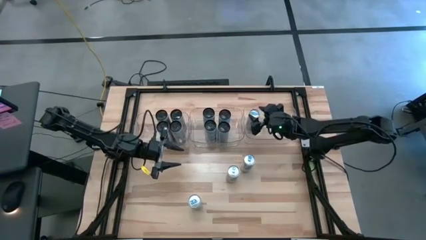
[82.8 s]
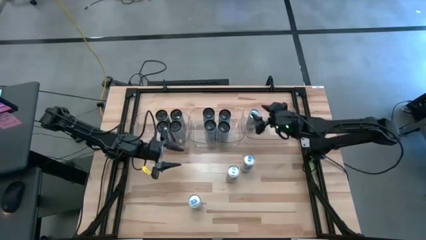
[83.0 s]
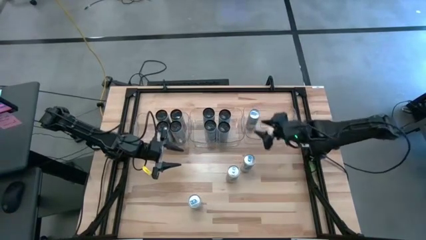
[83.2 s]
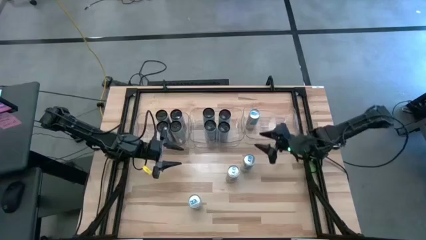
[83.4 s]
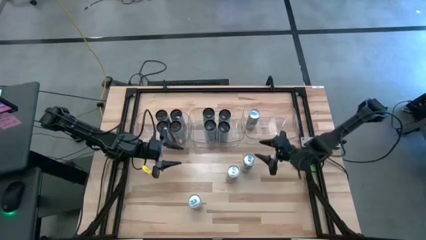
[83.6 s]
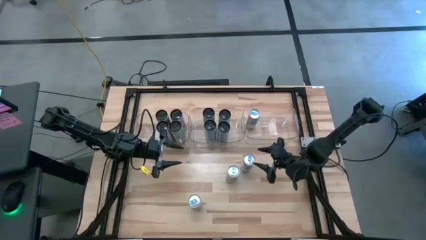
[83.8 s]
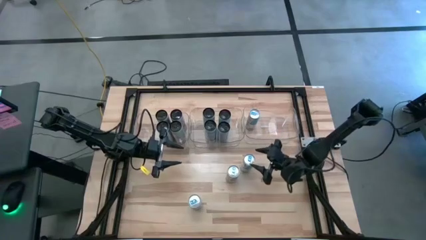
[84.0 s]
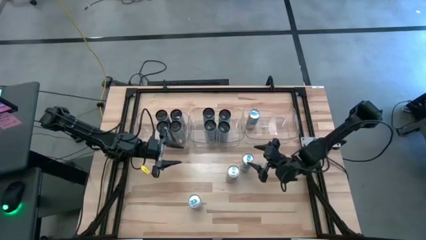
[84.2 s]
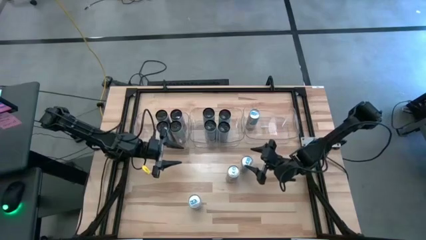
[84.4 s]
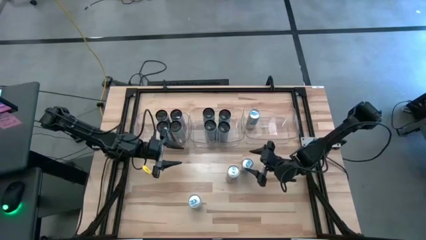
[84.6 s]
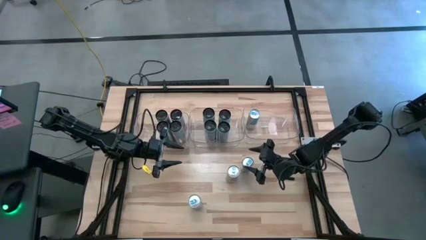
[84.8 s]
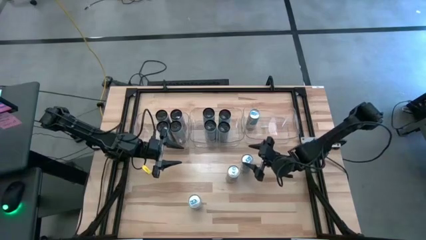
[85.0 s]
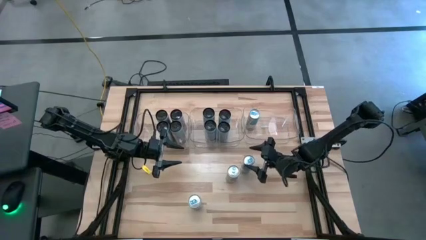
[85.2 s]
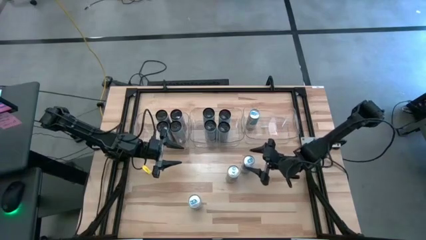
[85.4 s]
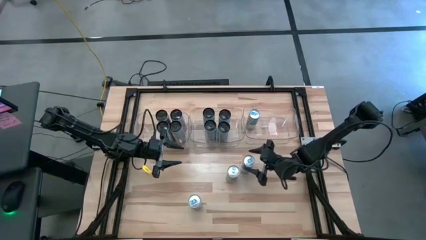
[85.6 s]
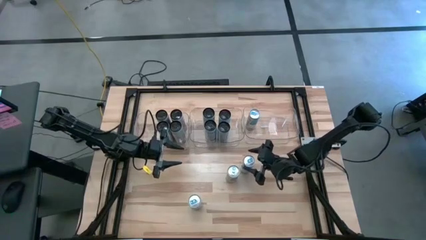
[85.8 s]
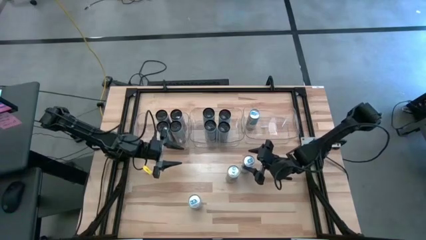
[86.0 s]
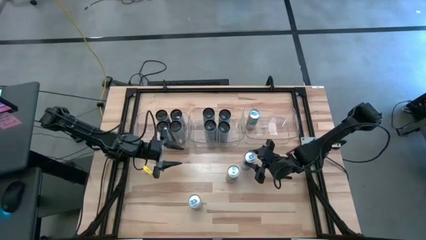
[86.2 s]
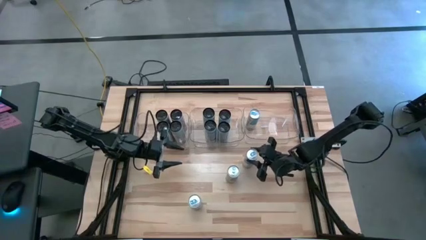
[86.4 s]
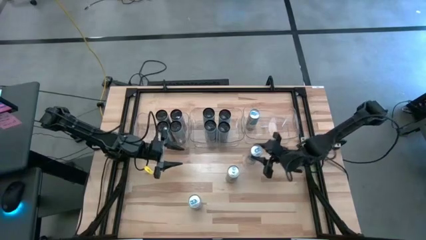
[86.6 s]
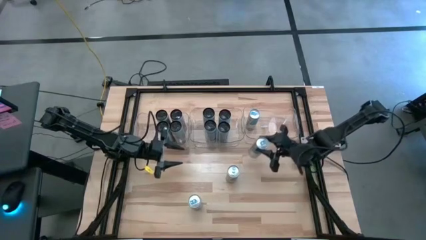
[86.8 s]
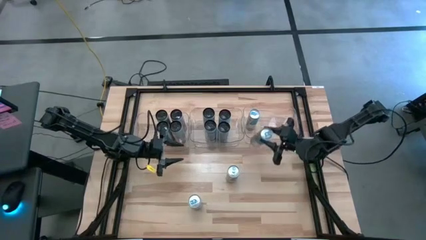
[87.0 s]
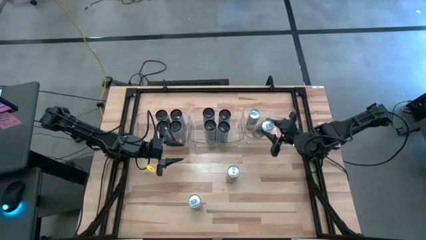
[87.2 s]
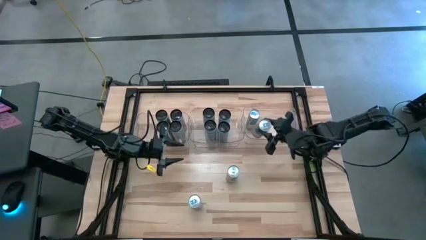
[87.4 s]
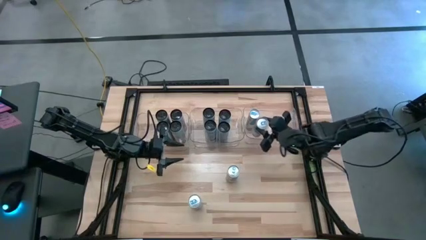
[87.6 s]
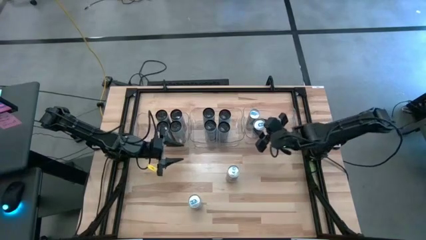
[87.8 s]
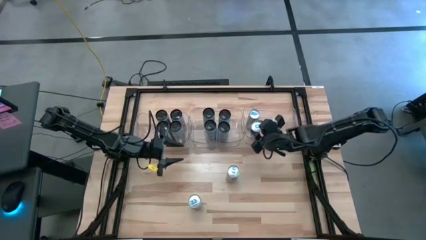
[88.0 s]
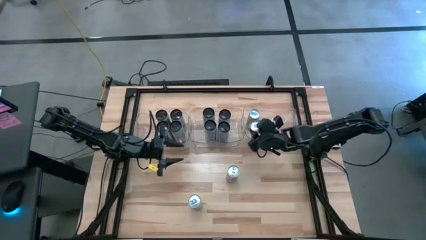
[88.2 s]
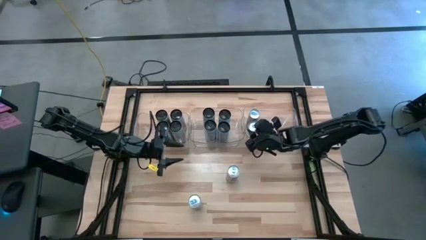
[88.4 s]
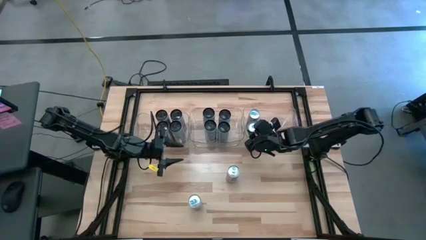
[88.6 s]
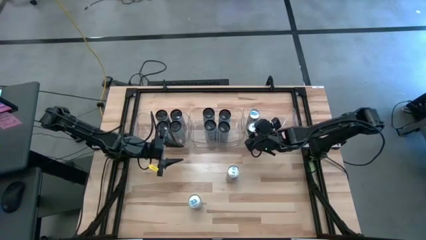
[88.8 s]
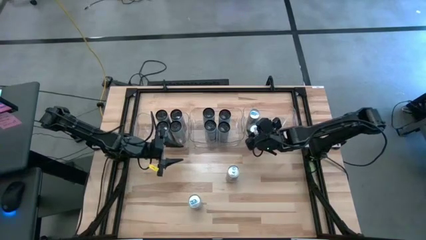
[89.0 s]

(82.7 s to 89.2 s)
Task: Sort soda cans
Put the silver soda can into the right transparent bin

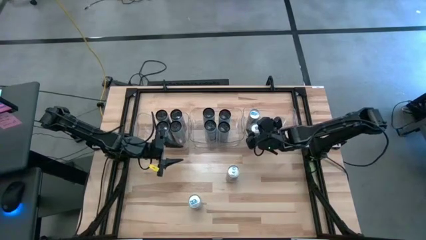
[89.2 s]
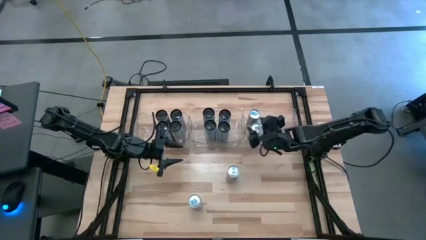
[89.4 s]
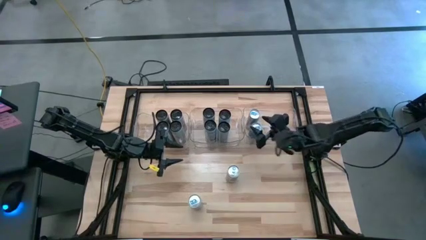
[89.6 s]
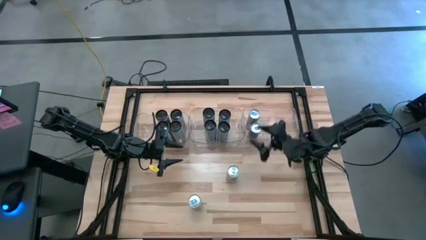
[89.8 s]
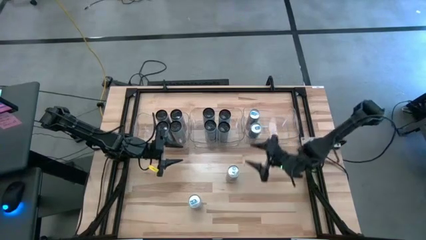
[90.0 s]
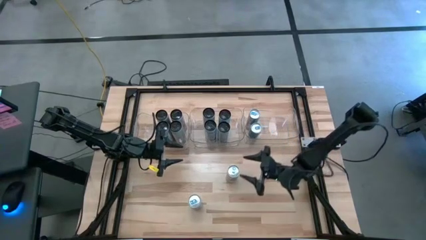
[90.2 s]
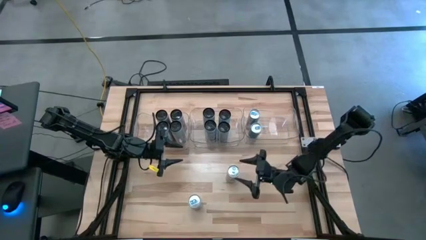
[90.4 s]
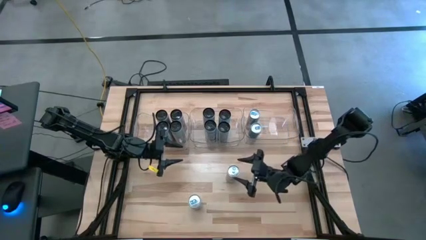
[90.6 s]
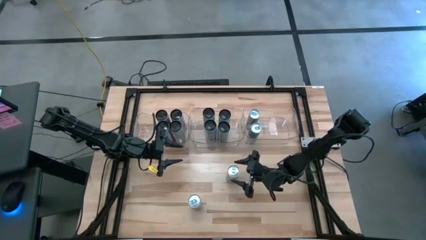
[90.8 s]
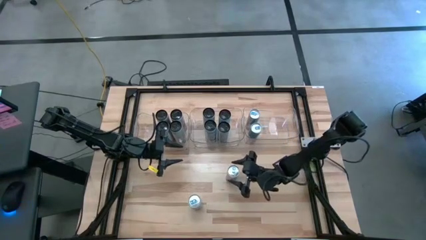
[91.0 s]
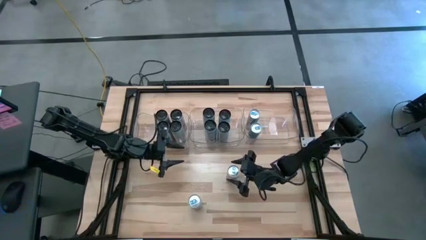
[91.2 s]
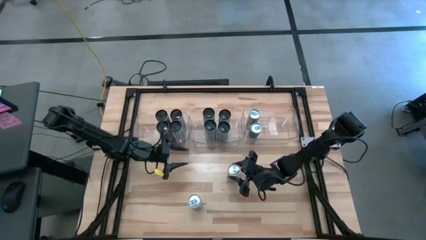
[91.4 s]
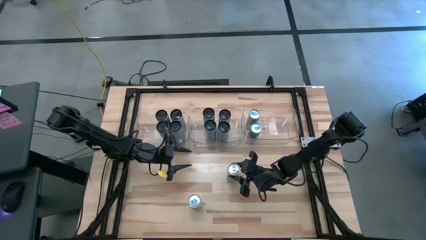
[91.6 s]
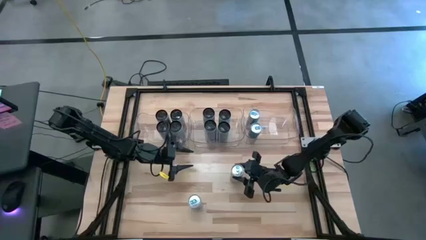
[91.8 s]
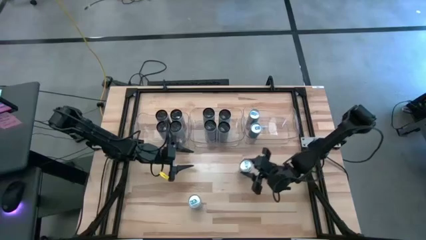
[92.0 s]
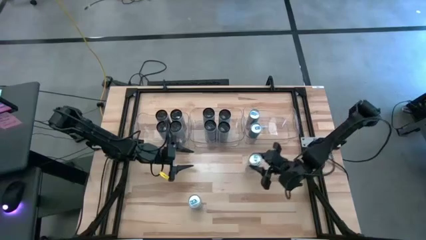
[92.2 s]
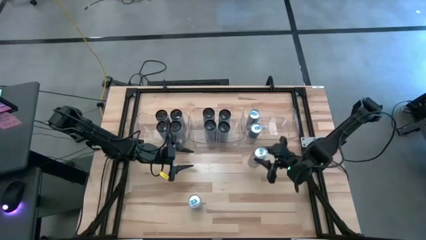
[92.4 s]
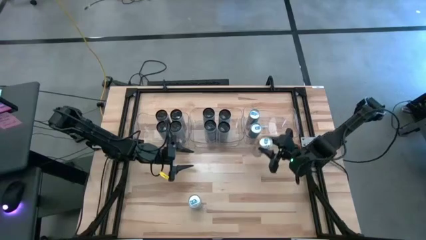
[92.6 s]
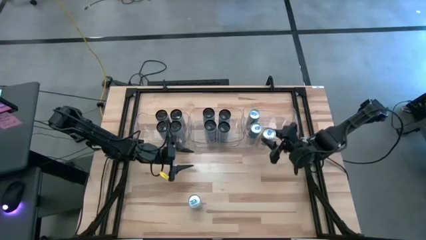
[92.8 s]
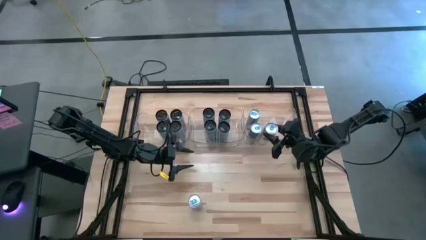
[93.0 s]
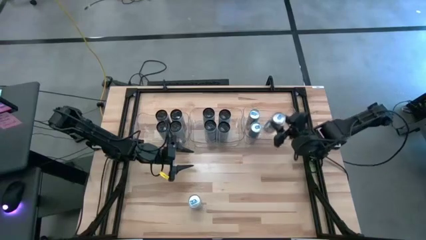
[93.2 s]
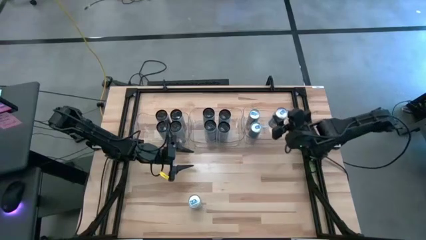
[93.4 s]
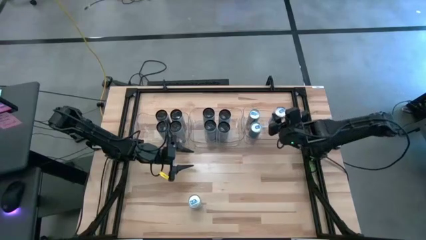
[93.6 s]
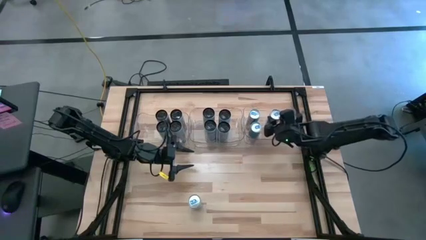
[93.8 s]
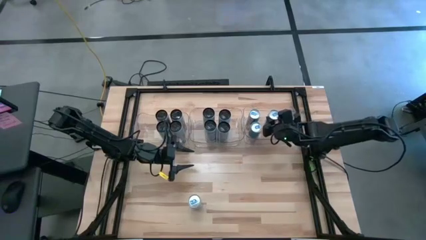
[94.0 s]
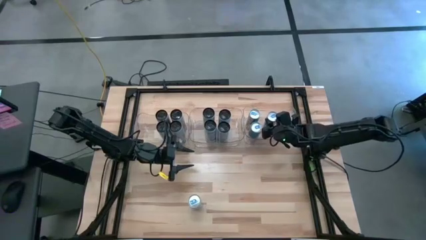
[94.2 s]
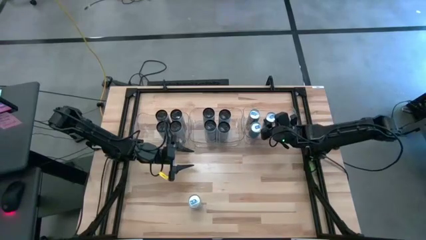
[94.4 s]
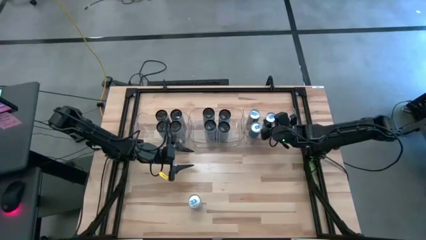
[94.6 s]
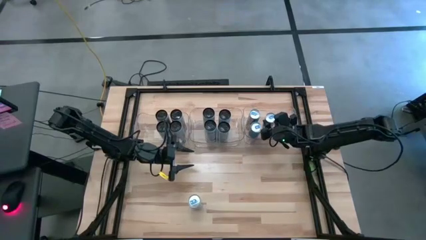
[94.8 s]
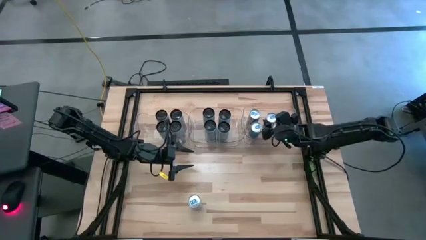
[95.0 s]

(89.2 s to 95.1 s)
Put the silver soda can into the right transparent bin

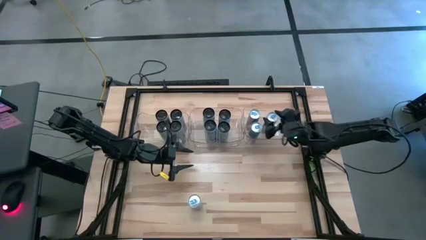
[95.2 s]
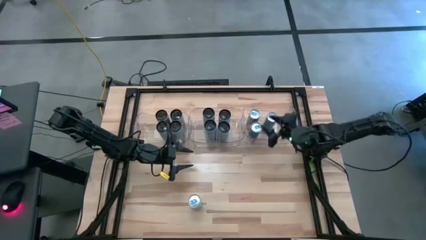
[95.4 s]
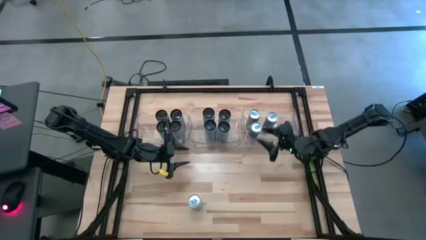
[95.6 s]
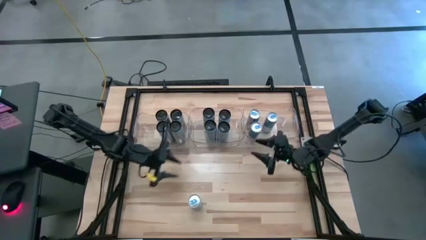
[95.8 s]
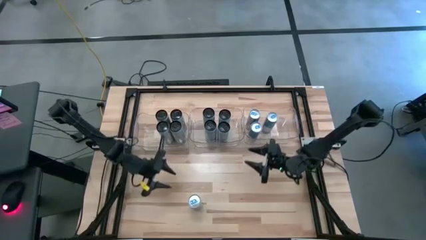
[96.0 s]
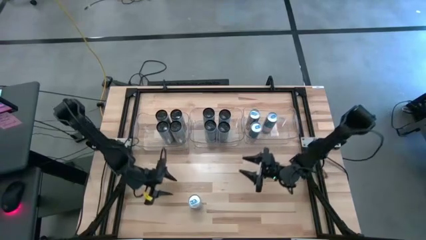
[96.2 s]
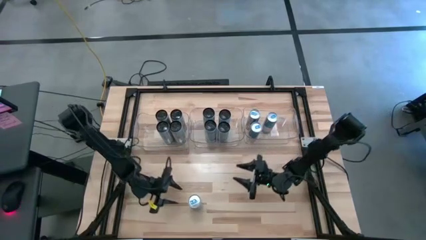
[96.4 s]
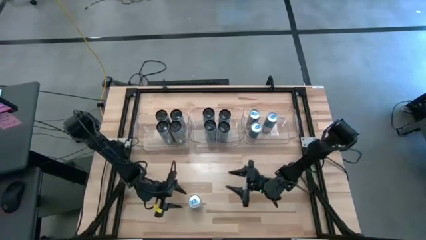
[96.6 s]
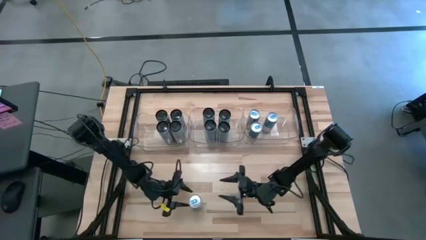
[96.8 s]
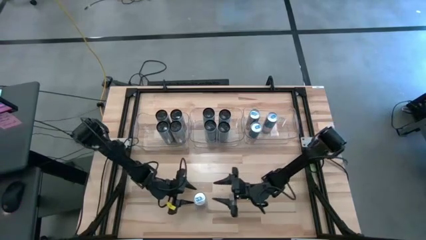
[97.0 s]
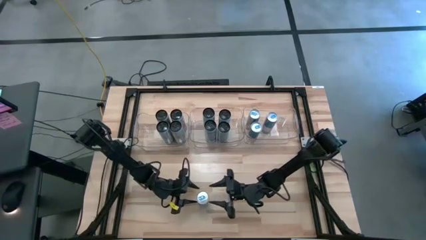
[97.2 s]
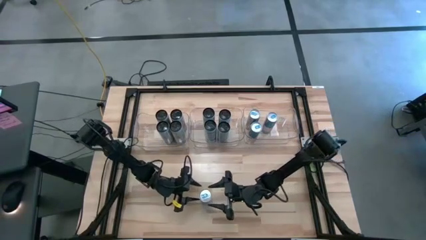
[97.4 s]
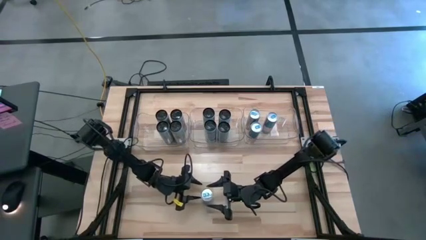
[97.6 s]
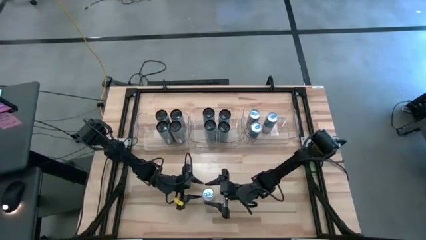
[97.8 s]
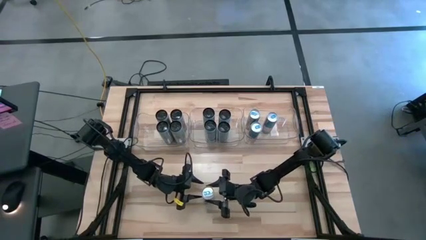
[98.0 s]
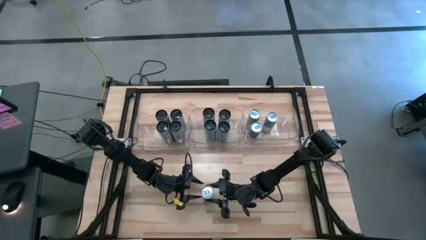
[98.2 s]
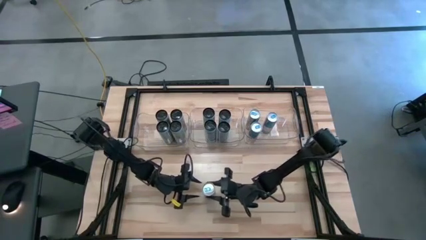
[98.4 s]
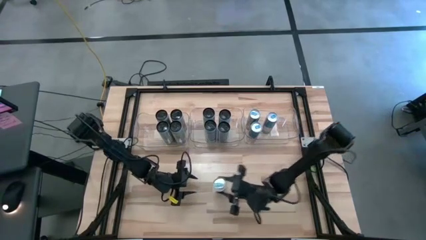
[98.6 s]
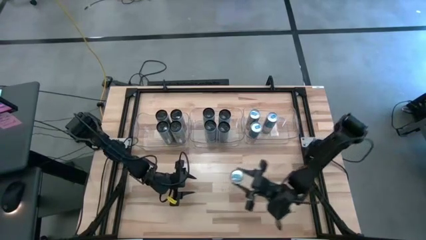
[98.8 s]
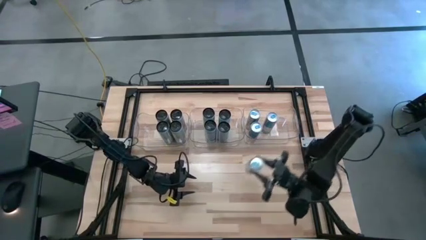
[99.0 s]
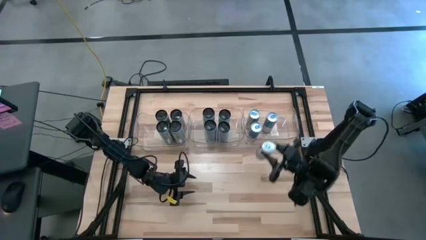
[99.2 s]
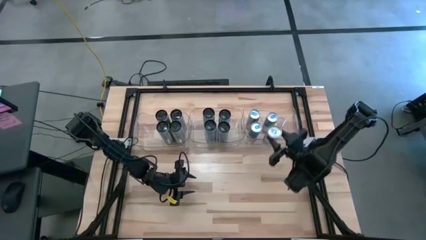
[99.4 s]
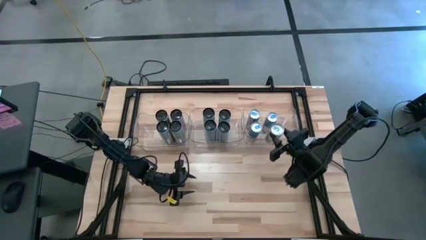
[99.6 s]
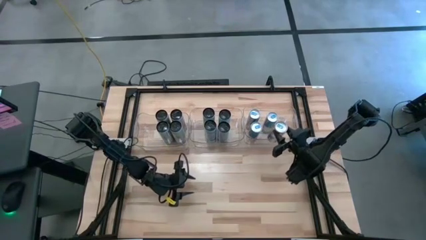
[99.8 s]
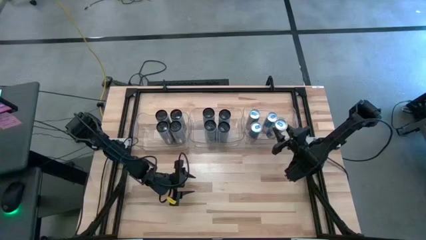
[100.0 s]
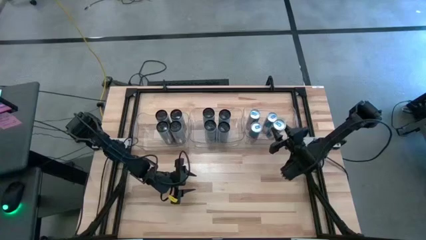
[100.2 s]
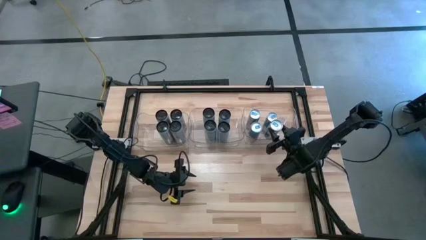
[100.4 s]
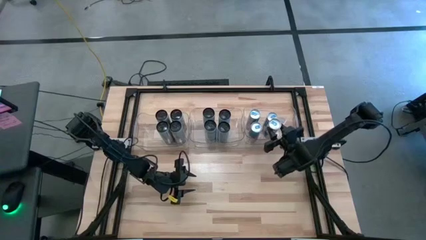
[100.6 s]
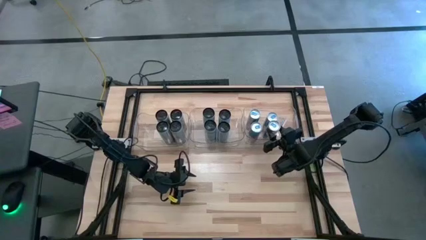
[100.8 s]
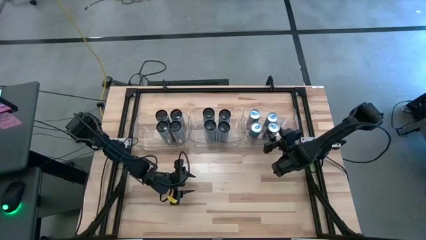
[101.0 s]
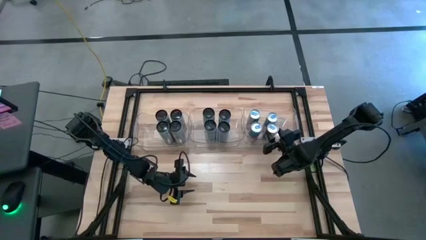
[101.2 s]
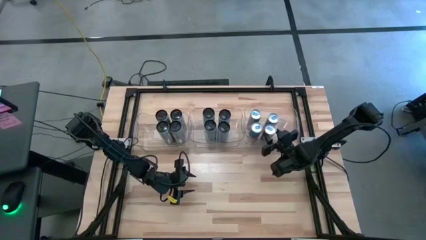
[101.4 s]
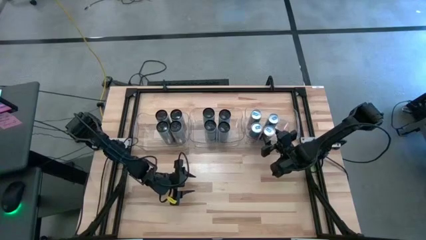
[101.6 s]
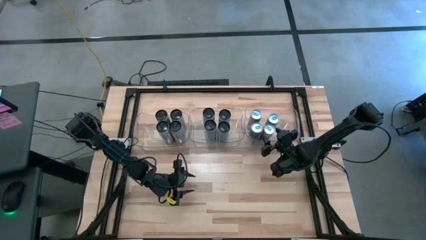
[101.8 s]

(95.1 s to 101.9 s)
Put the silver soda can into the right transparent bin
